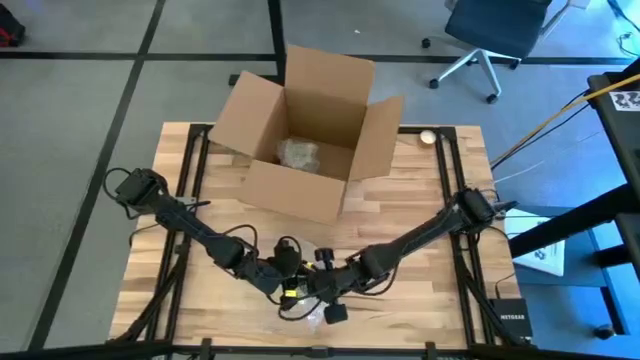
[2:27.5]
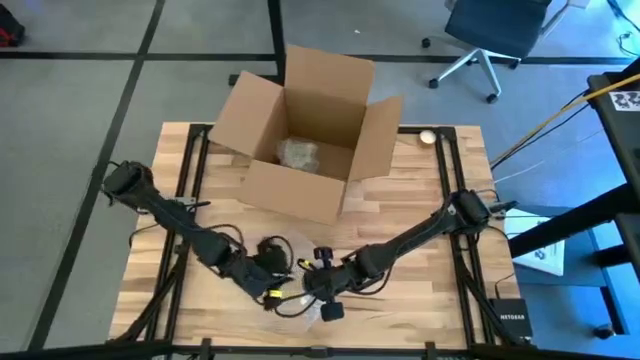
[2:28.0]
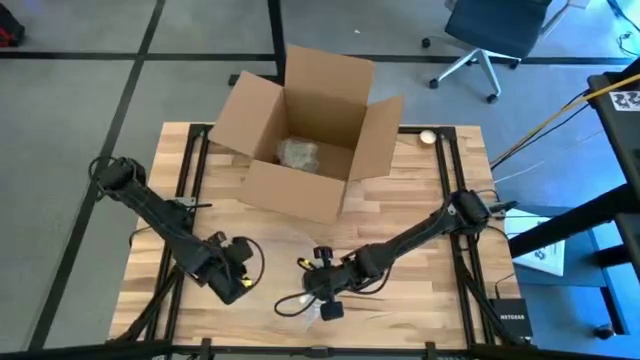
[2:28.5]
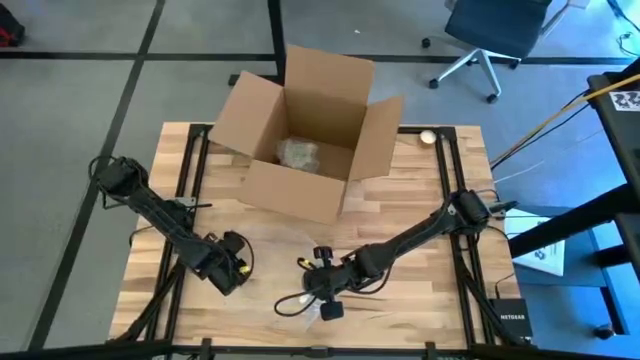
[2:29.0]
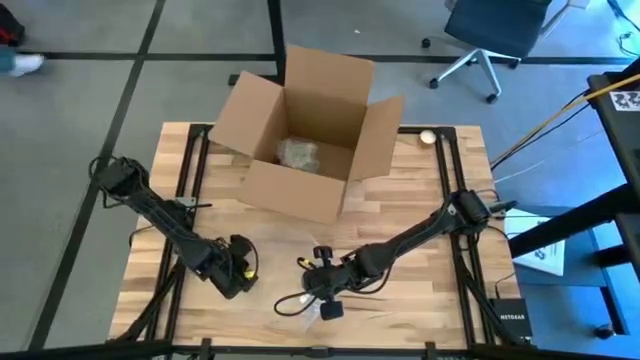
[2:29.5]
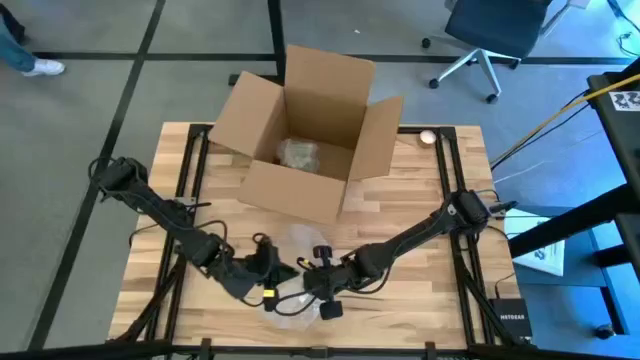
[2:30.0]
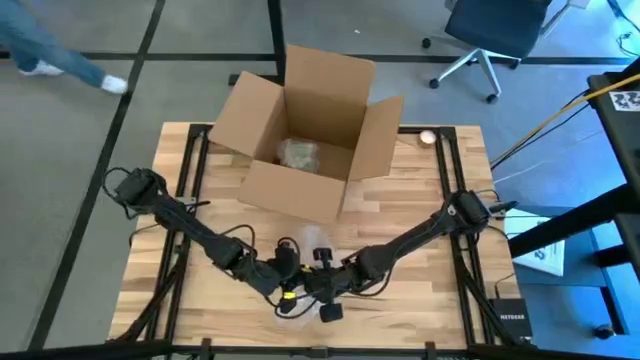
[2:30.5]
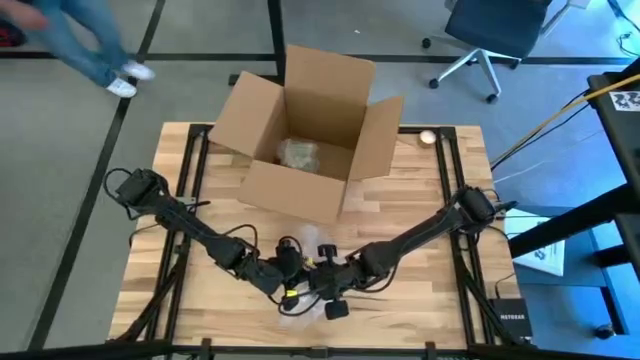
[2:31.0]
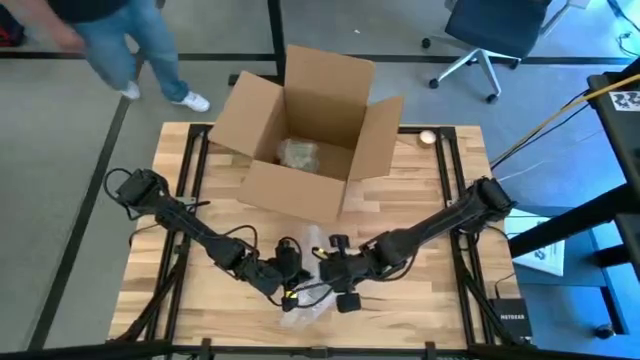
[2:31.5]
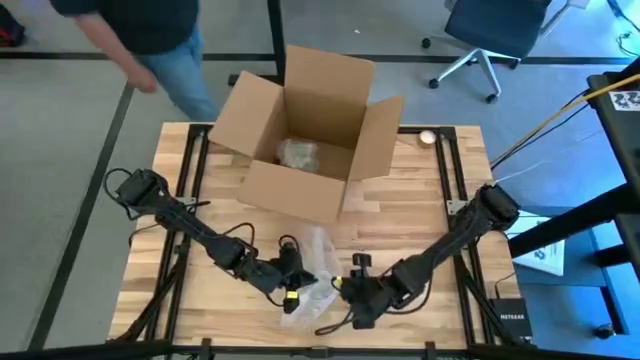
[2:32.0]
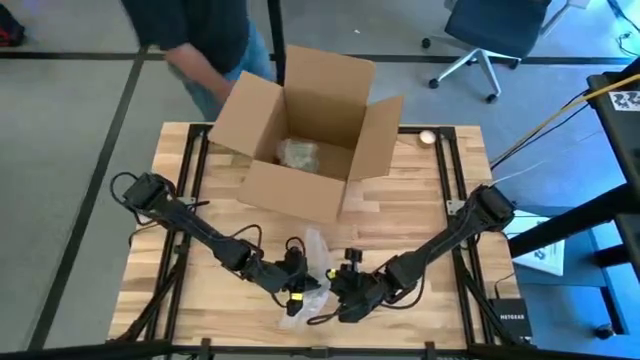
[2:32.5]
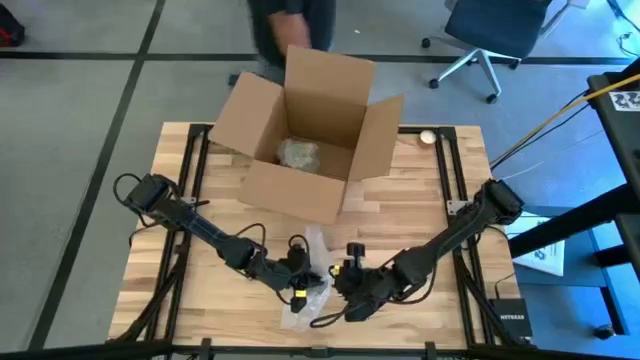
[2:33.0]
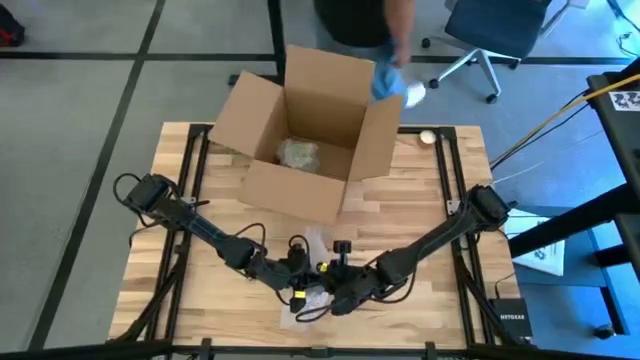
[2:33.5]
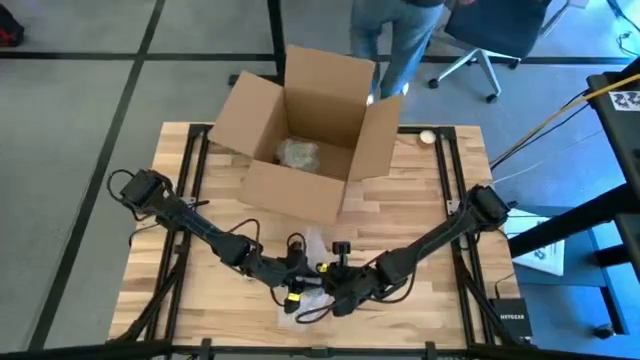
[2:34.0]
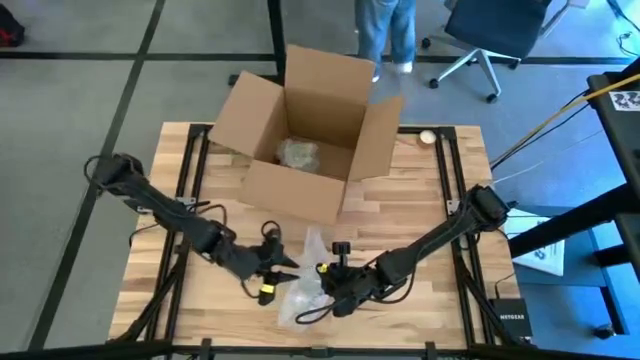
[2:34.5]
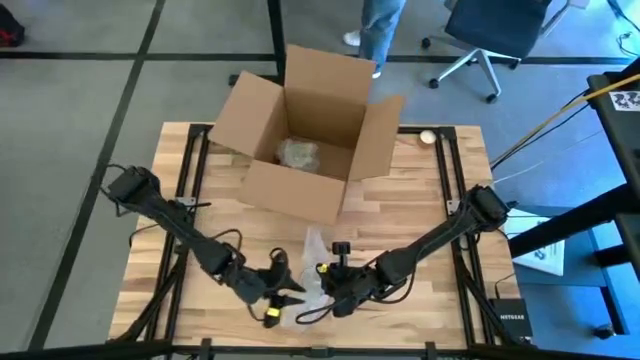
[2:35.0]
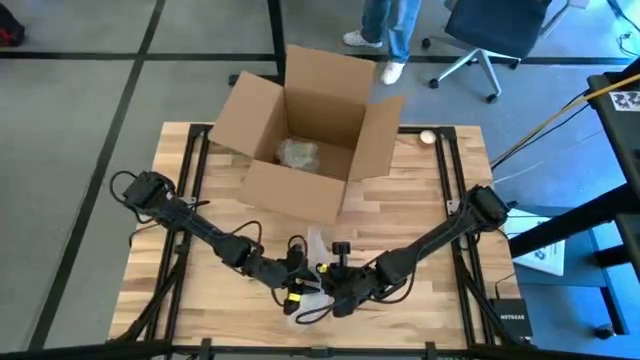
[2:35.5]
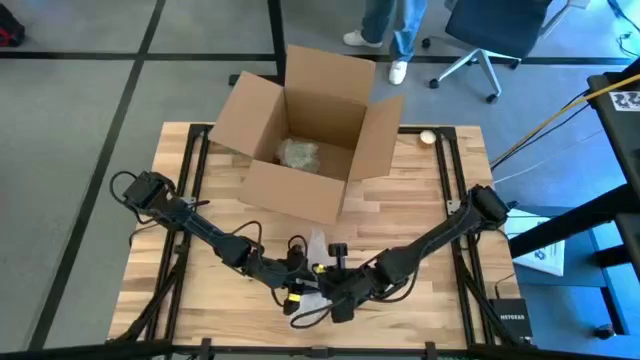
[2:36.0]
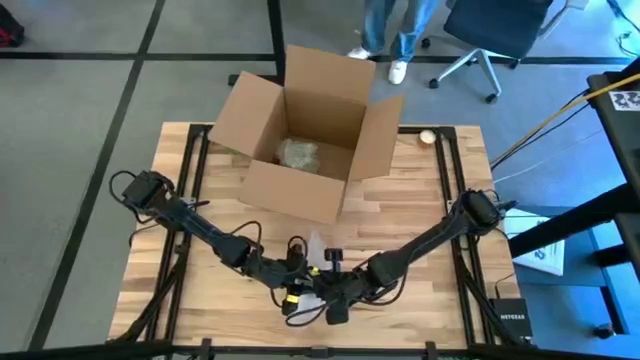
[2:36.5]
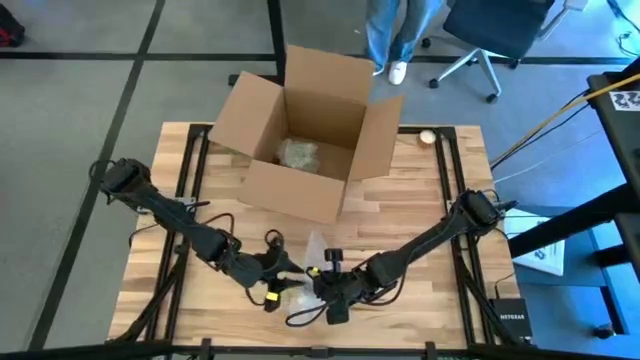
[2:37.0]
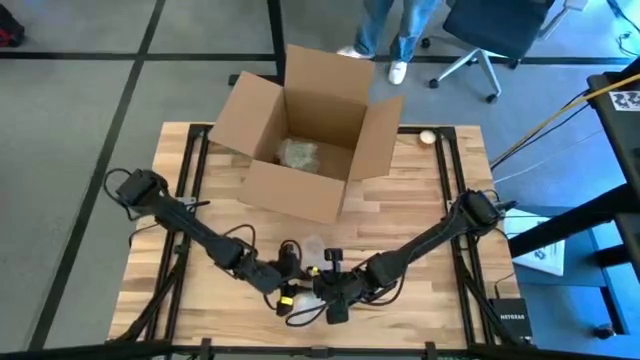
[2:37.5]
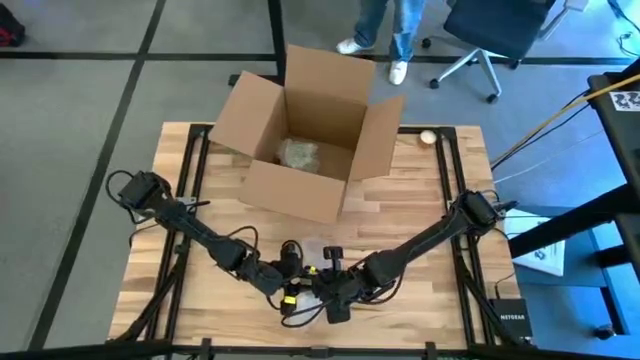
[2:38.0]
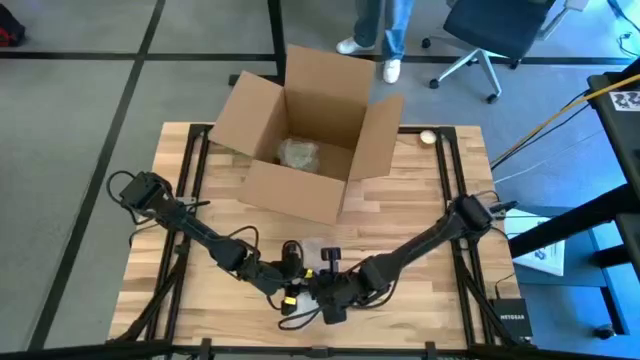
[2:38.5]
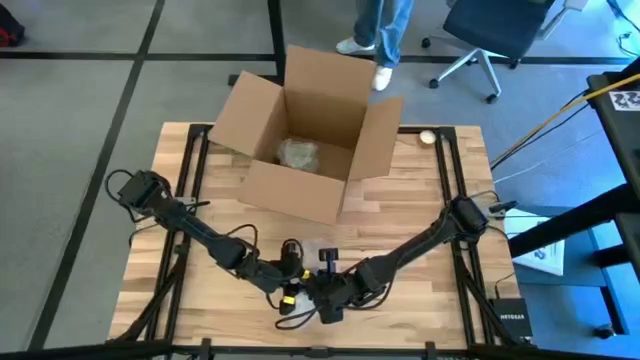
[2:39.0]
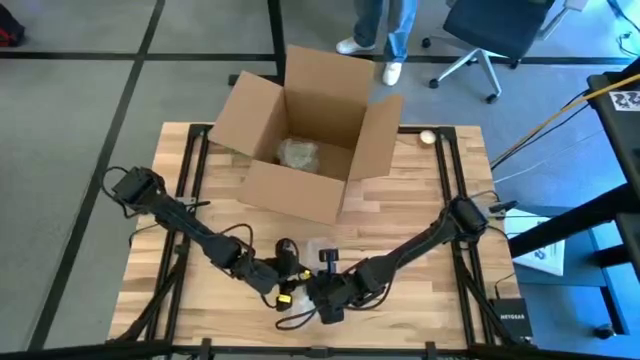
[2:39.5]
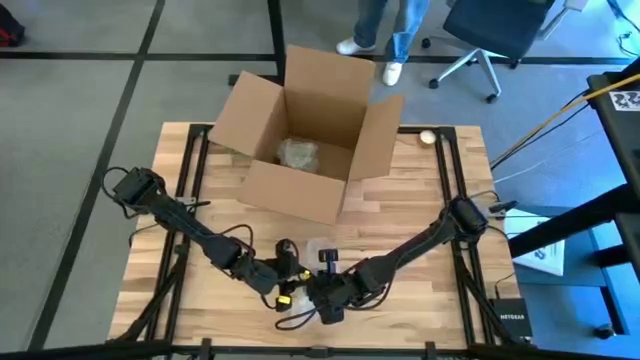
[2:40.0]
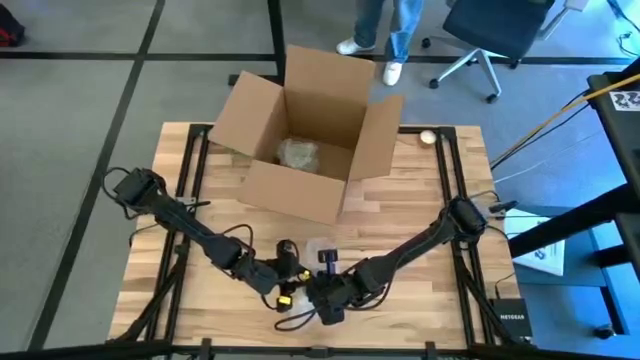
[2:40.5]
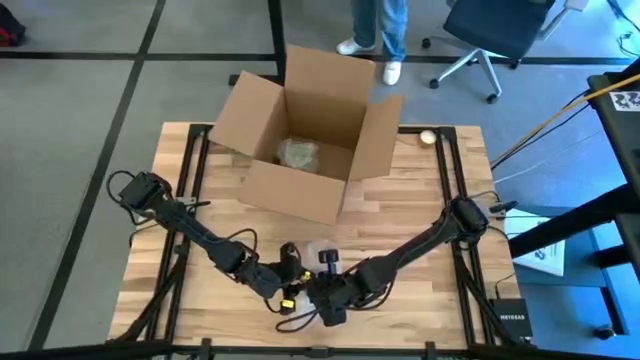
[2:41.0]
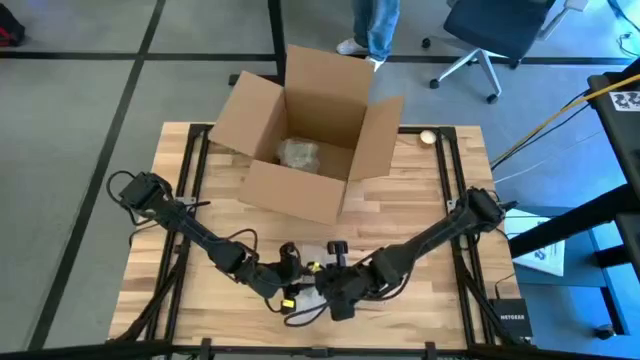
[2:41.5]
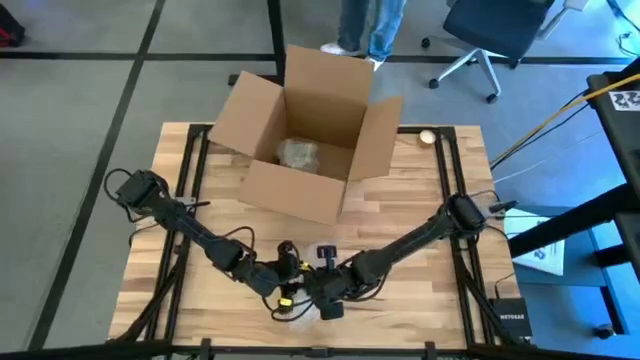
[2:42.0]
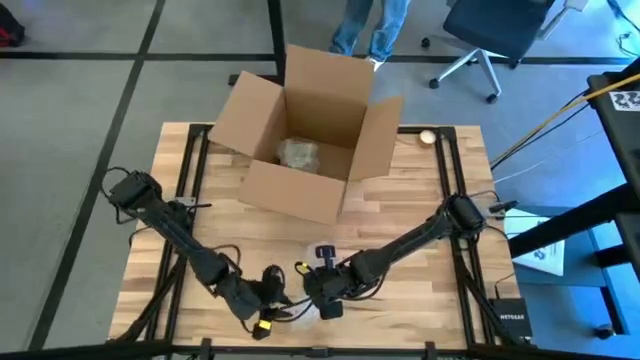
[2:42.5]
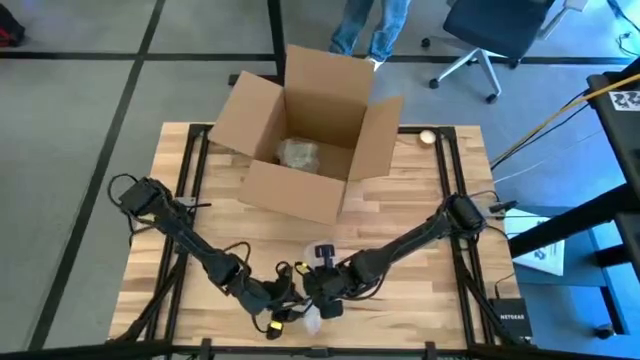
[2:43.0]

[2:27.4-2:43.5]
Task: wrap mug
Wrap the blue mug with bubble wrap

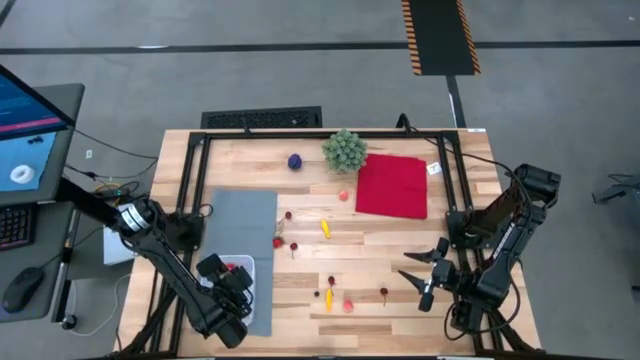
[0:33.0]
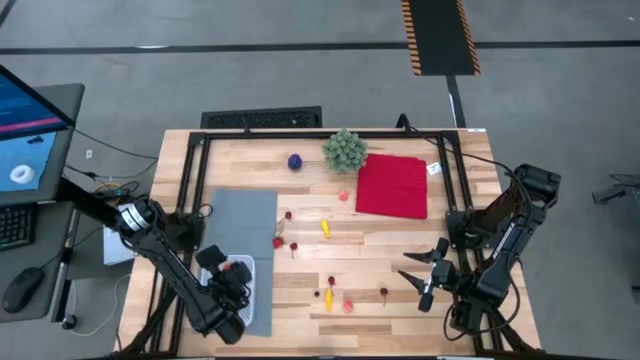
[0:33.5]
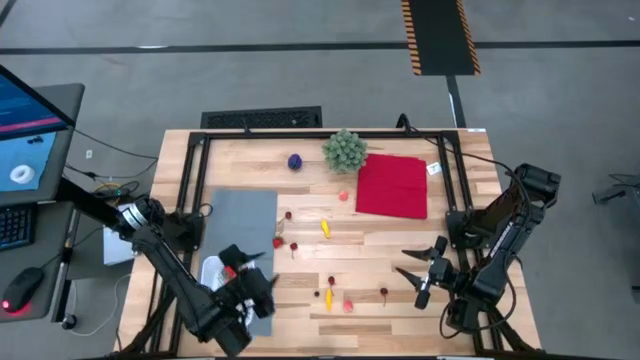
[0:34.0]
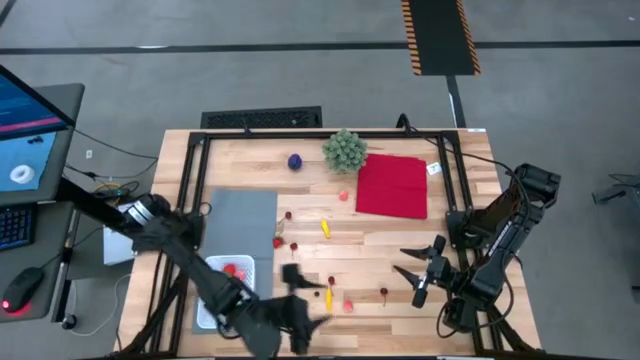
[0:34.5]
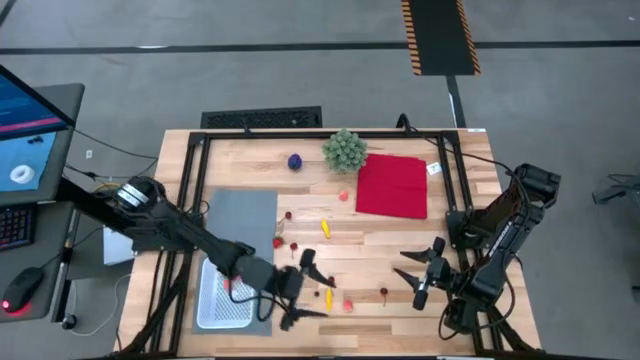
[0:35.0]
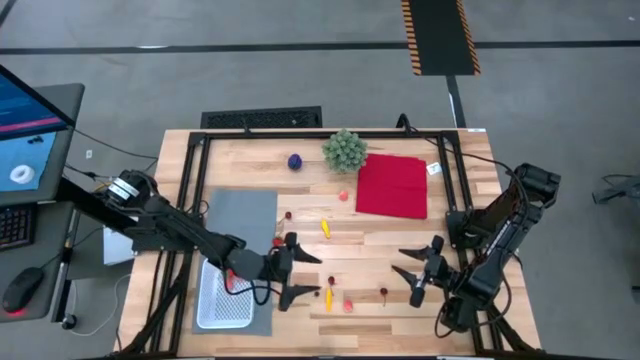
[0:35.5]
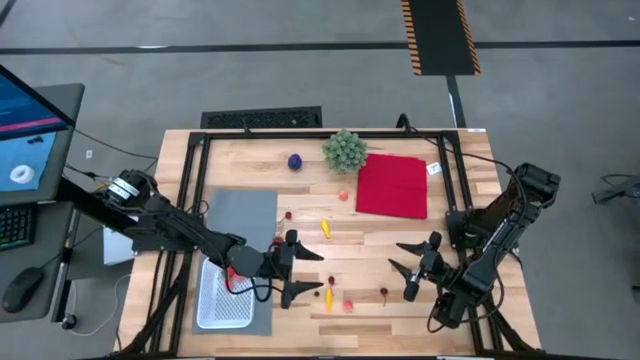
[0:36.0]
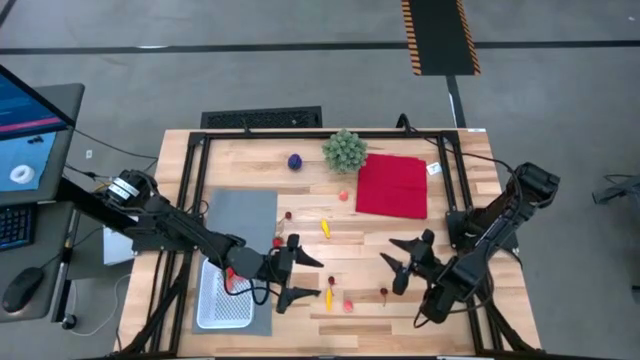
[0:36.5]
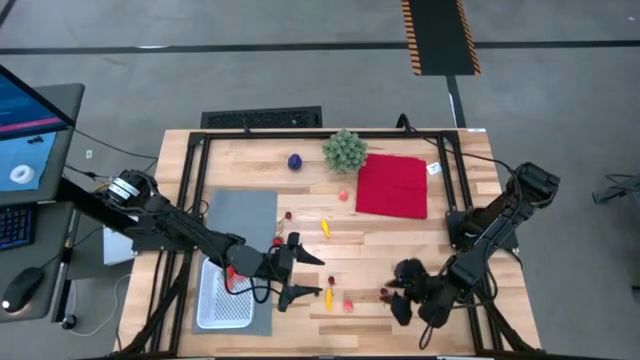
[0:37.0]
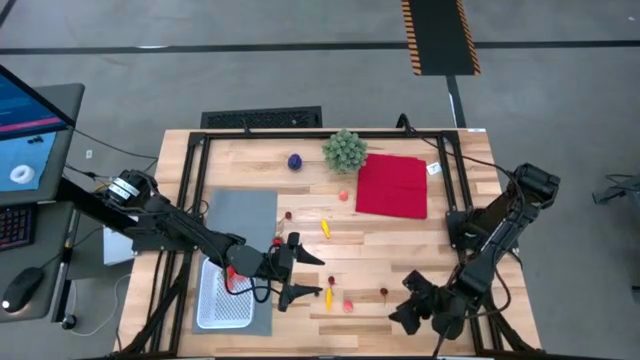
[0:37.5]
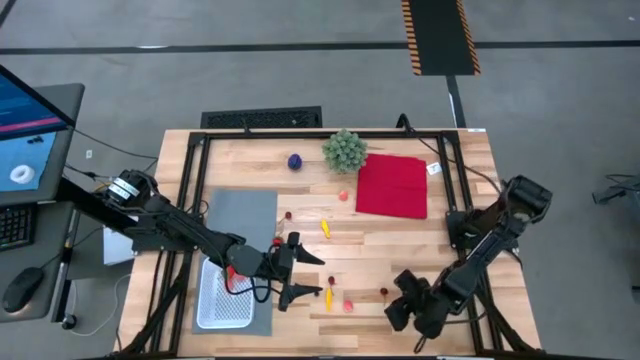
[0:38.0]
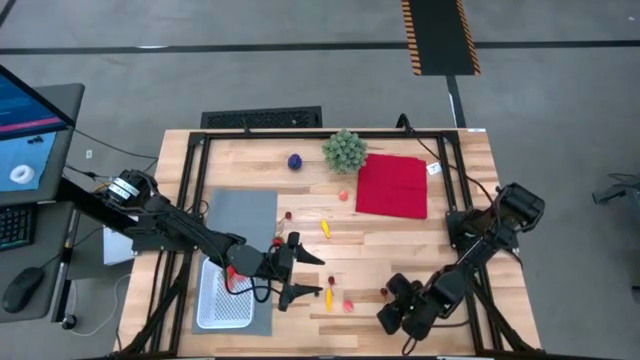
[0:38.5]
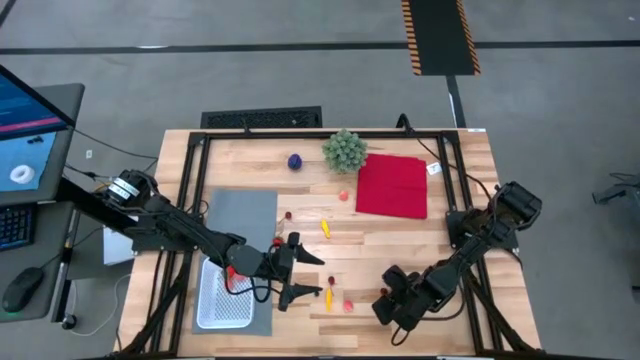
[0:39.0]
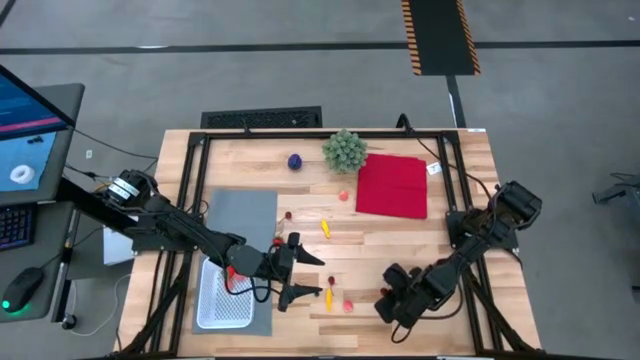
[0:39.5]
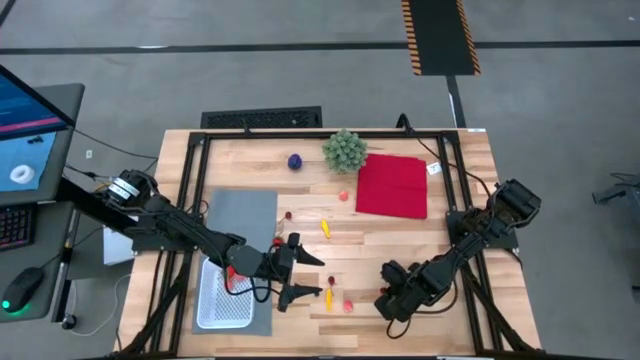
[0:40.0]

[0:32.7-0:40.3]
Task: Pick and placing Produce into tupperware
Put the red cherry into the white basket
